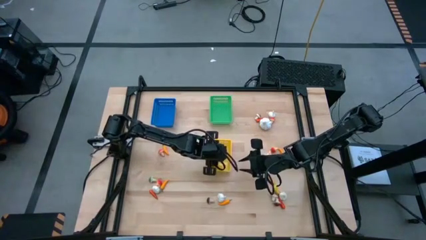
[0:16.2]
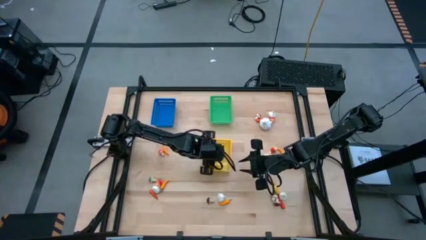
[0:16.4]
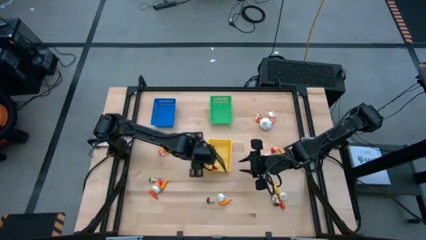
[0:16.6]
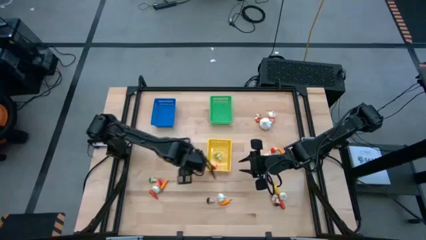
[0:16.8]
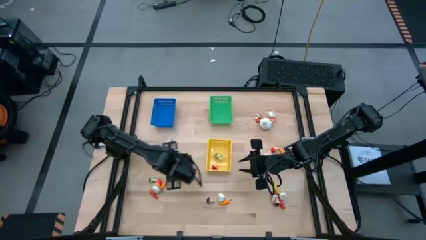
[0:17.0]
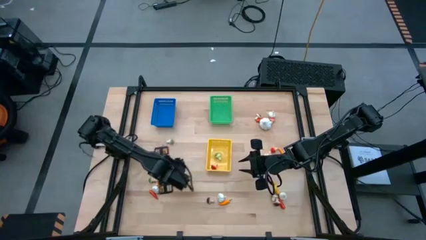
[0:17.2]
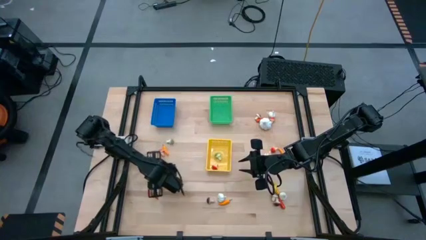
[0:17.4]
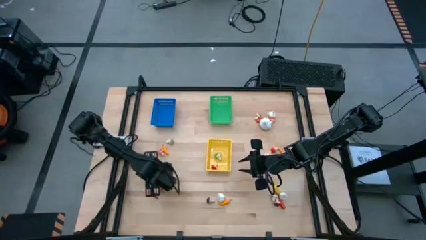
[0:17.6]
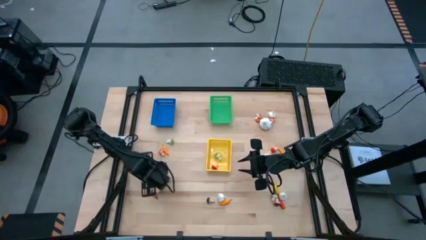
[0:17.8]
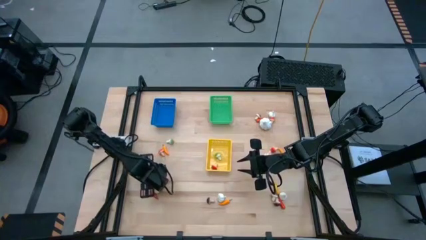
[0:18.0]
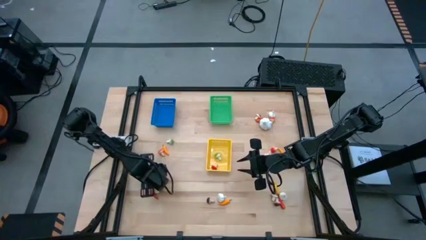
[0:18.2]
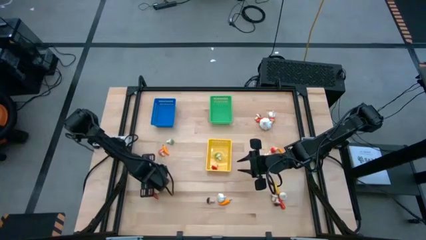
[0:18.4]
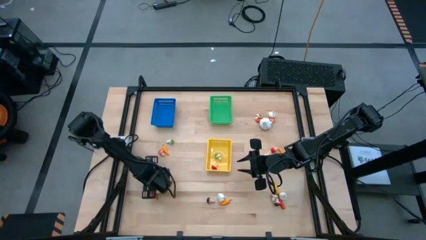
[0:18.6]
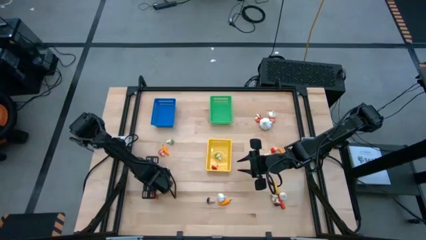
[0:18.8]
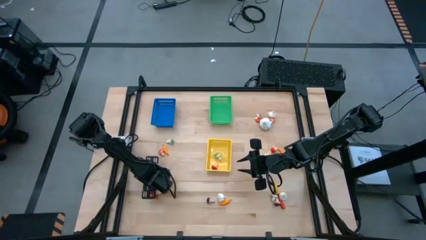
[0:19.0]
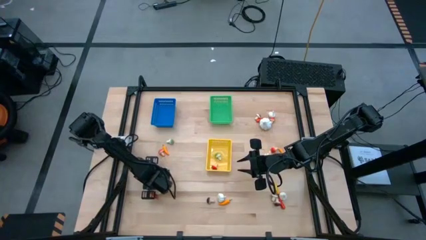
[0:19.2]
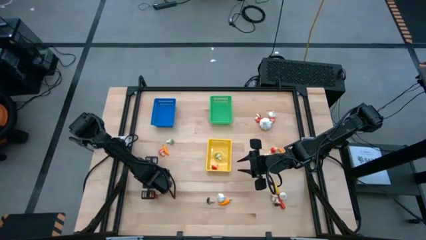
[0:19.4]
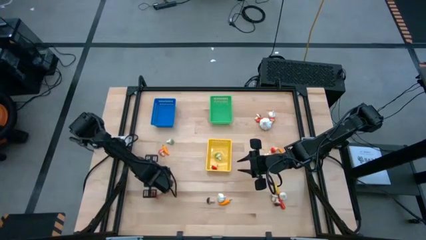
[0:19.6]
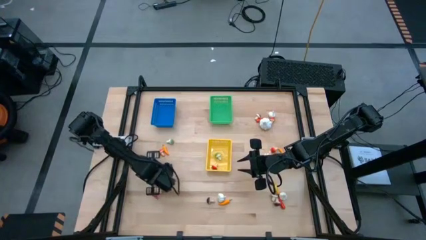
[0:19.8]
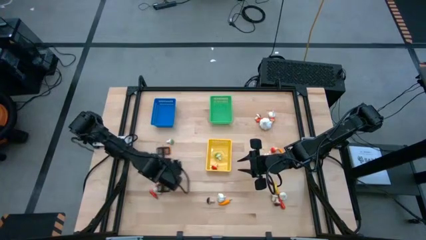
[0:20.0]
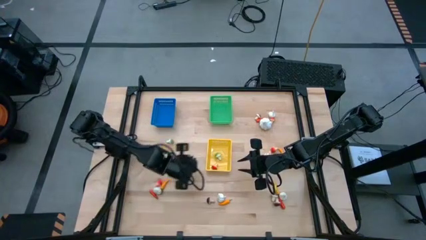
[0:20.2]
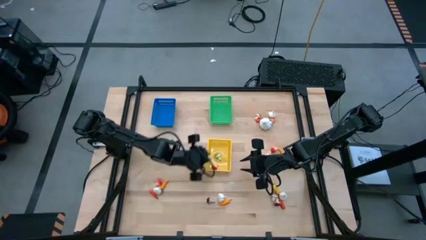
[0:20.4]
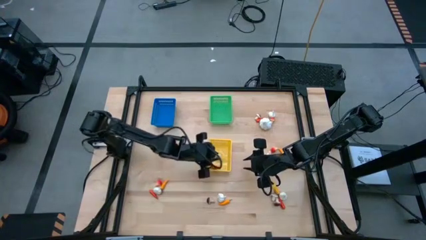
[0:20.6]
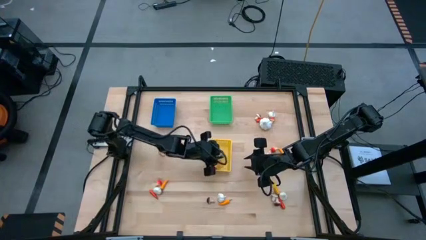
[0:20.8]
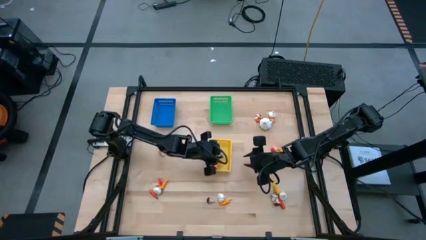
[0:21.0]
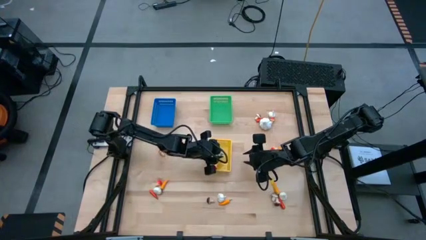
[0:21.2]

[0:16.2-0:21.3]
Task: Sort produce into baskets
Put the green mushroom into the yellow bin

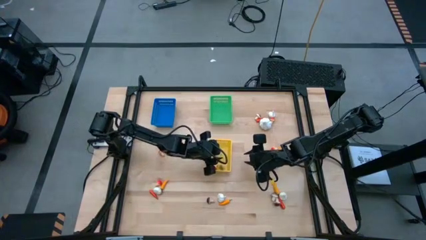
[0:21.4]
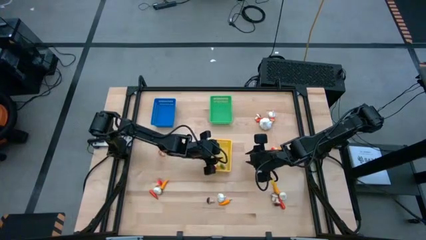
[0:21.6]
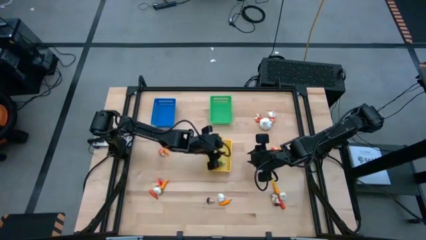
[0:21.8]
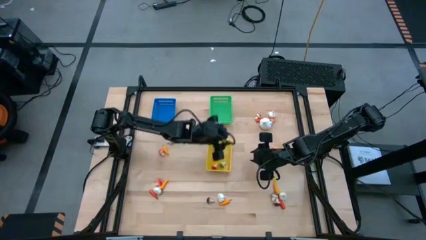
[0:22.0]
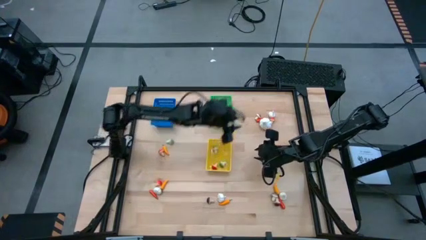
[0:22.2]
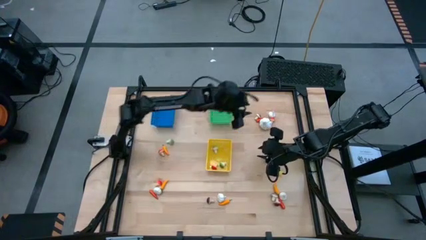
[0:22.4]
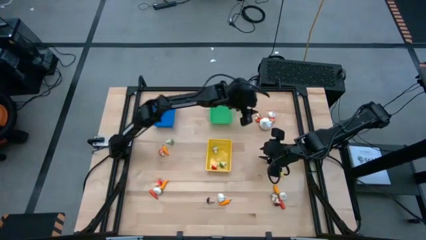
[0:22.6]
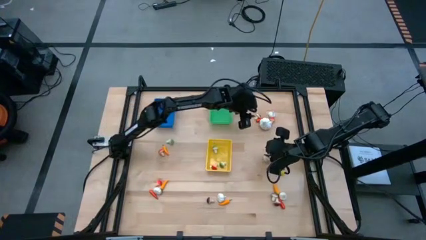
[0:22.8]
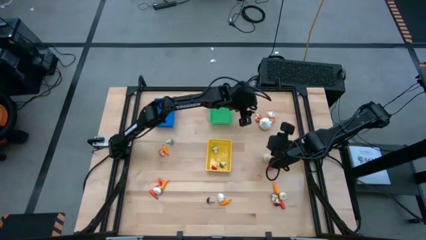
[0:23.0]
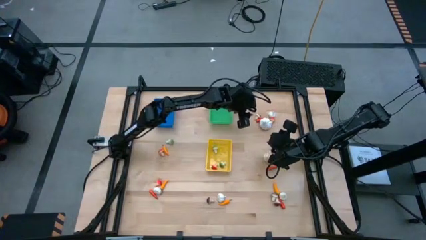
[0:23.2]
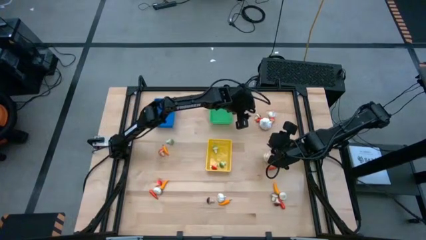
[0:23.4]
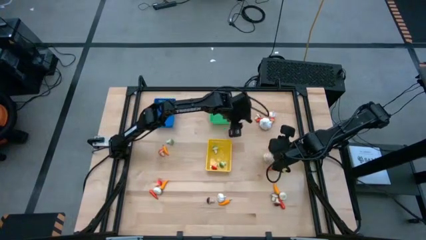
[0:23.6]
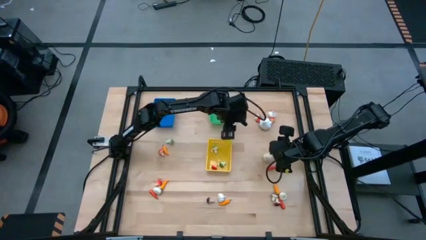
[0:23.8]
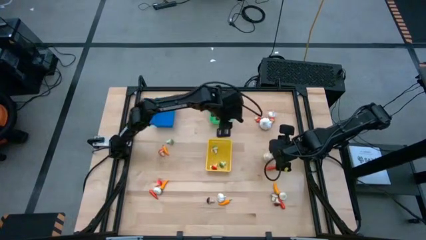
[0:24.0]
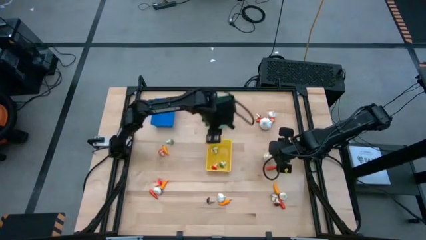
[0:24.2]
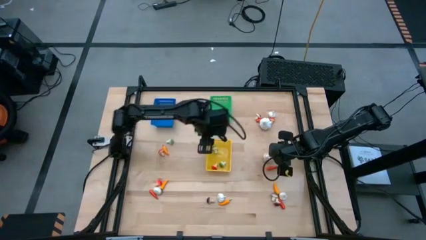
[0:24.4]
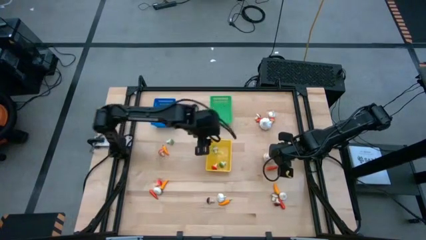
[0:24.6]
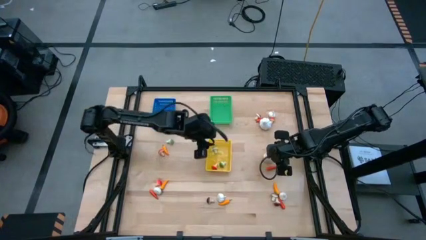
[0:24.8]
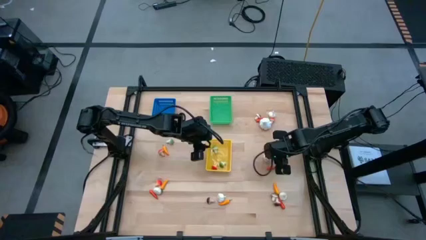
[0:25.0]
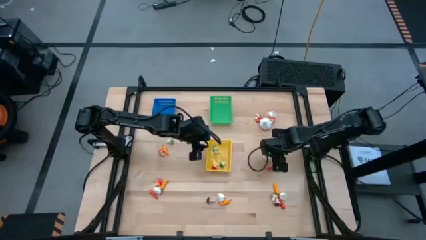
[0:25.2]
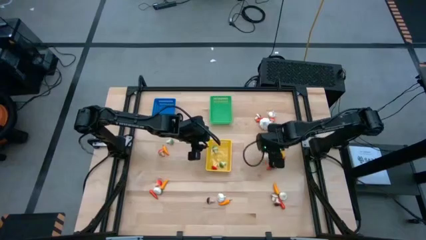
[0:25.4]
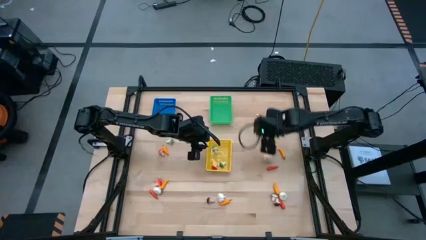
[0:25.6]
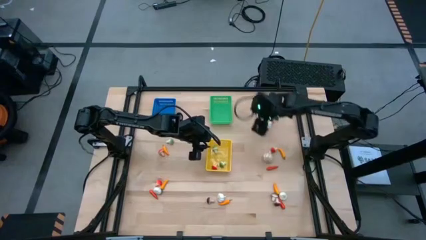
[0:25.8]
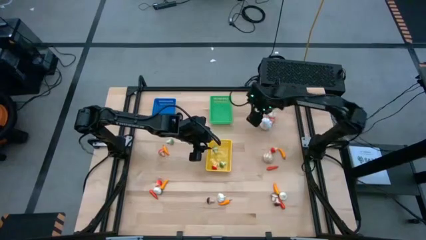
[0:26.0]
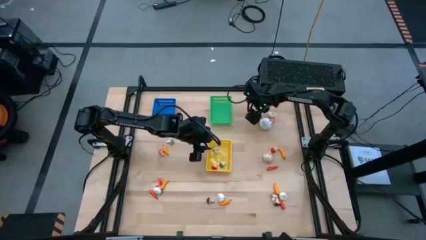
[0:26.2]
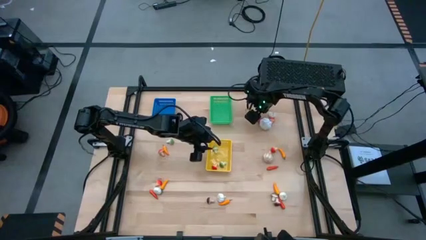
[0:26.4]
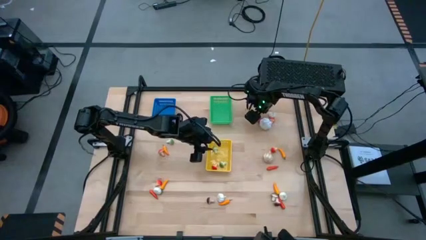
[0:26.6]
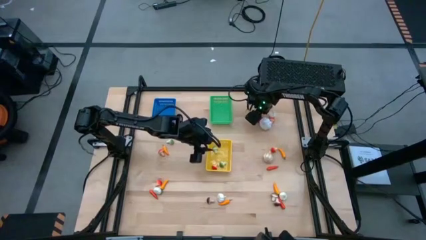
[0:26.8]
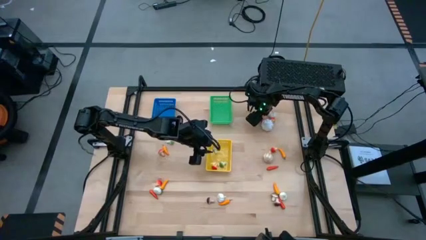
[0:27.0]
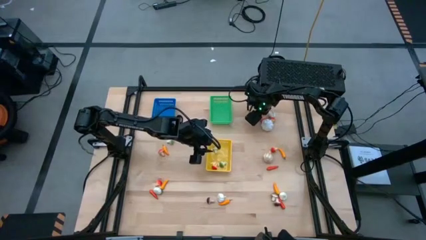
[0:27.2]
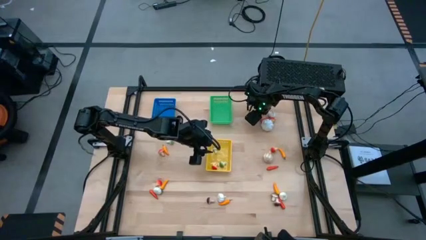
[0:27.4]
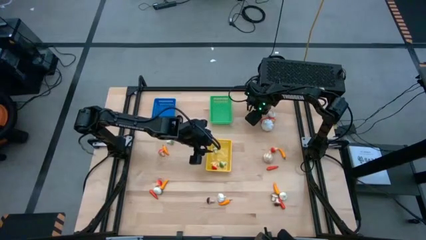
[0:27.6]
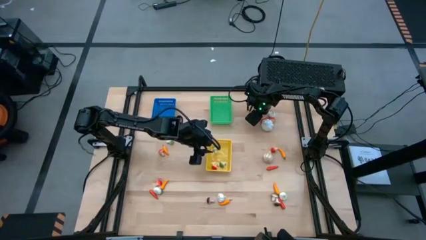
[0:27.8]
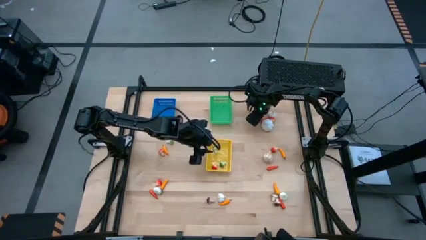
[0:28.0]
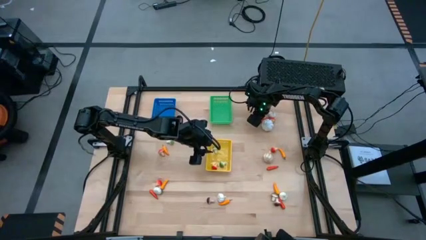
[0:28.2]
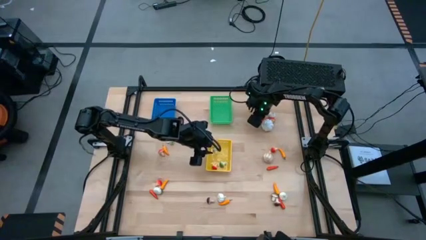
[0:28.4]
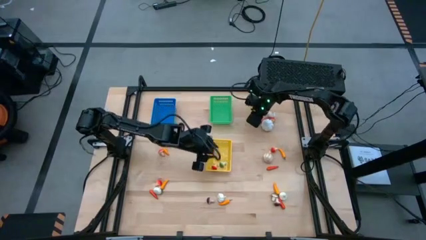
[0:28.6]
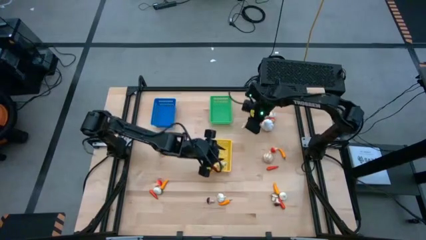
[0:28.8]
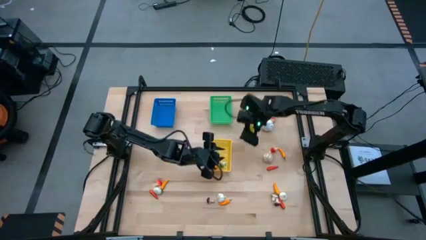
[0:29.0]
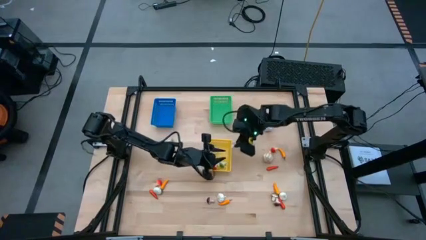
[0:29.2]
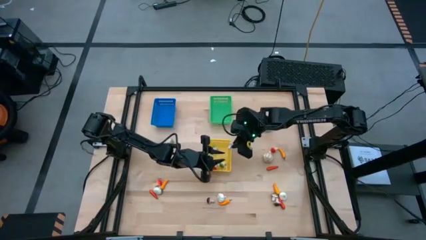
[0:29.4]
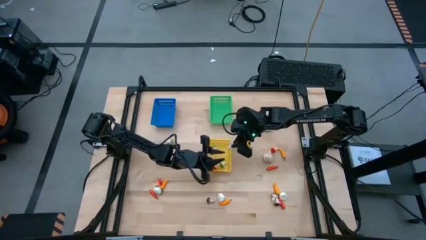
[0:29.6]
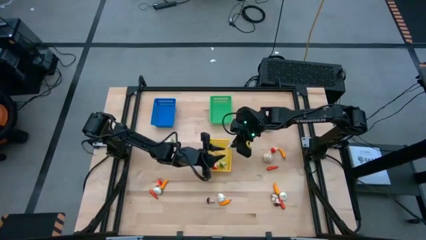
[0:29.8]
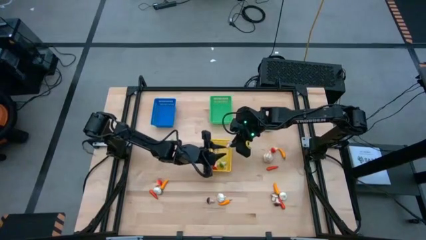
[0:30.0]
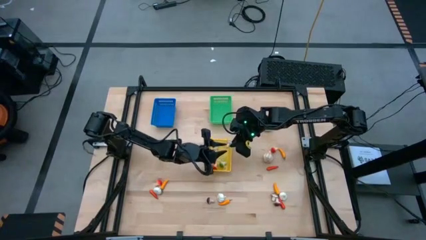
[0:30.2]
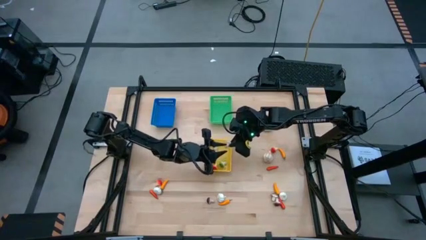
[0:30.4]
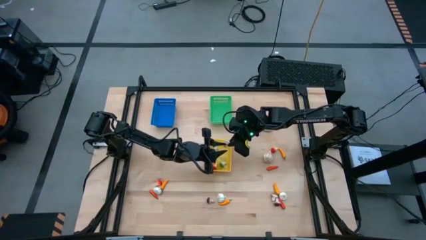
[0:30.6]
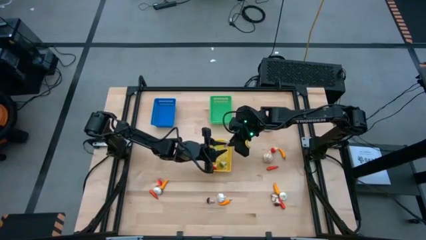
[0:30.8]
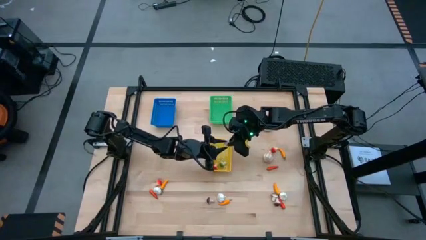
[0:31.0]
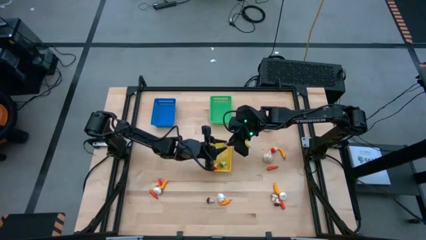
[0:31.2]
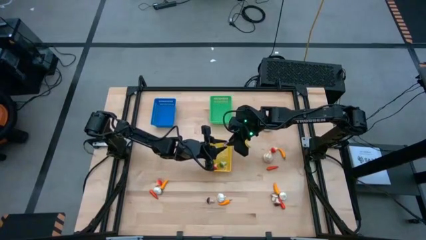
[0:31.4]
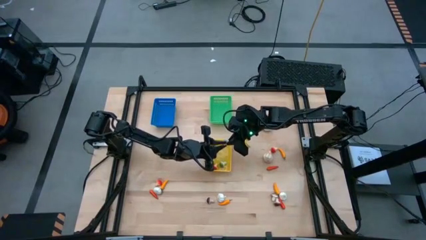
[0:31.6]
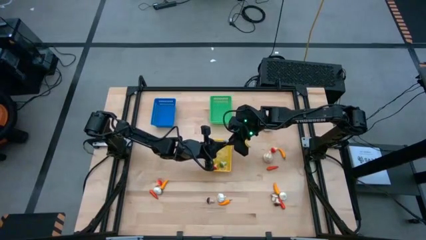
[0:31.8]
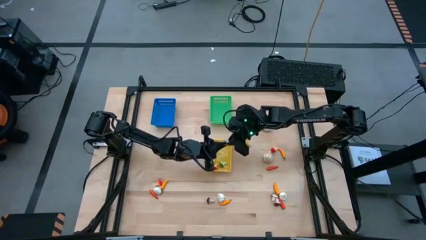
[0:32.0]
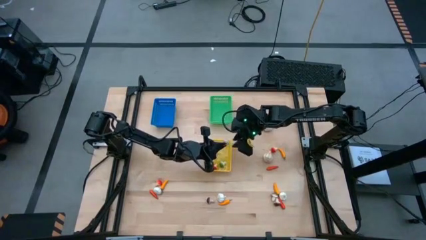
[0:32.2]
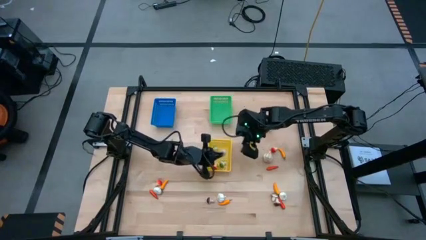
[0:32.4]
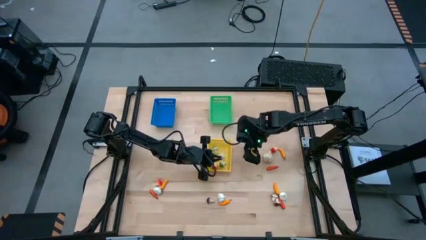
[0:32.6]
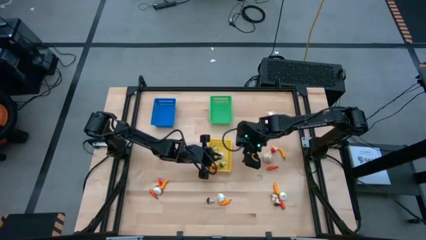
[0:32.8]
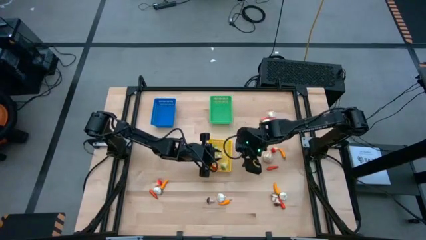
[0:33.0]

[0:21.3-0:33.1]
Put the brown mushroom into the yellow bin
